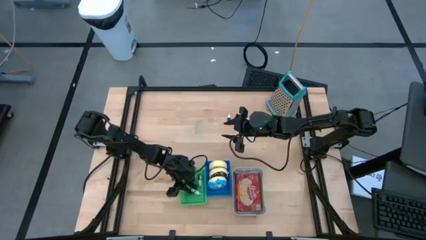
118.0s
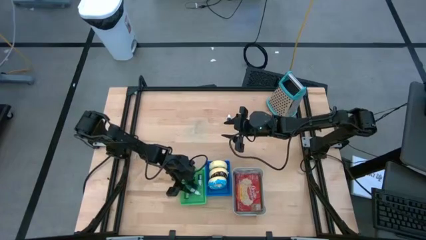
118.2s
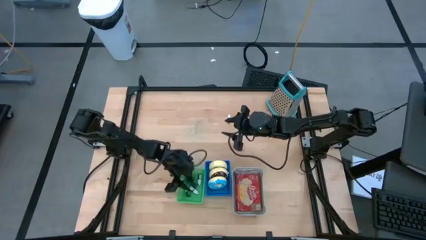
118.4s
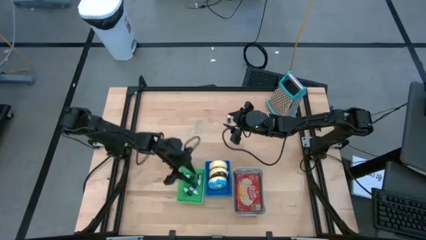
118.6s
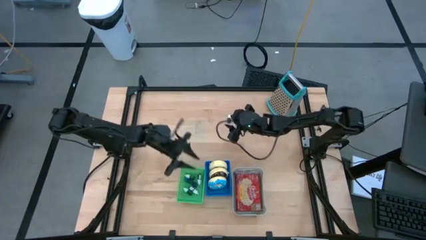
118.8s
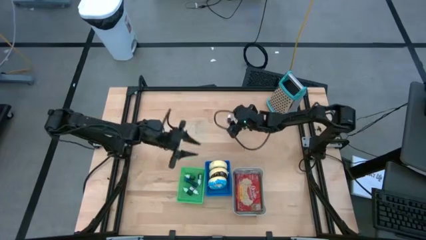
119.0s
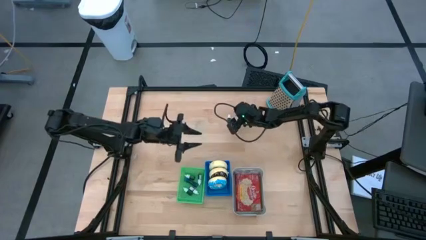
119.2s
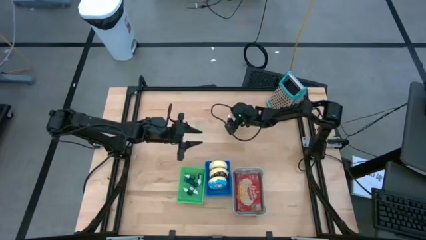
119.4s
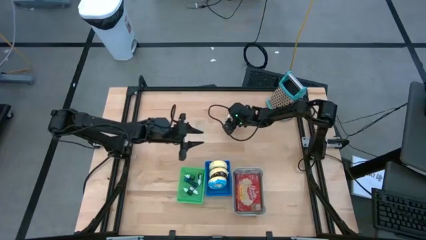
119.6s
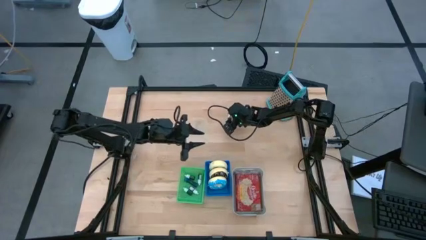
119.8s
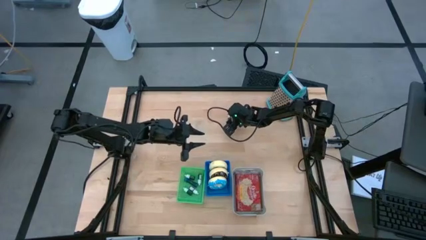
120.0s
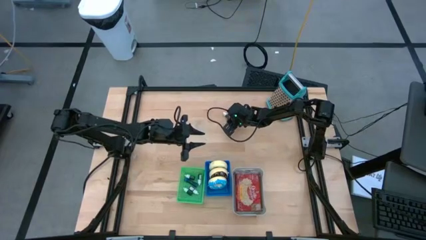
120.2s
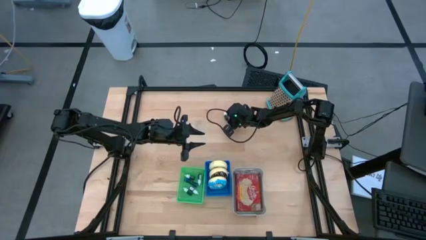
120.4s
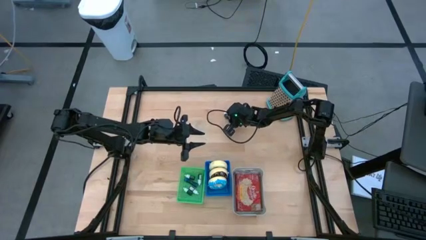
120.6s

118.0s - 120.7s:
Put the dark blue food coloring bottle into the green bin

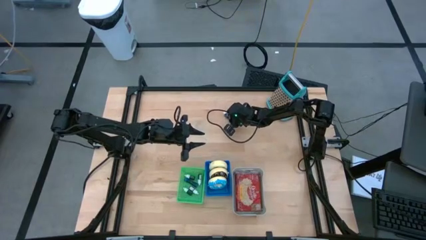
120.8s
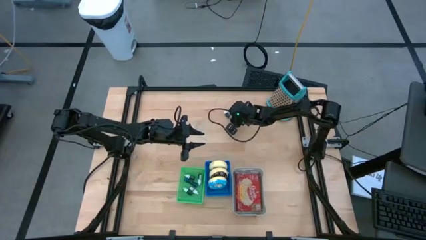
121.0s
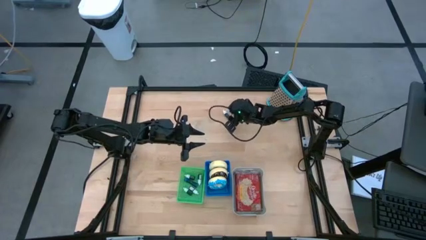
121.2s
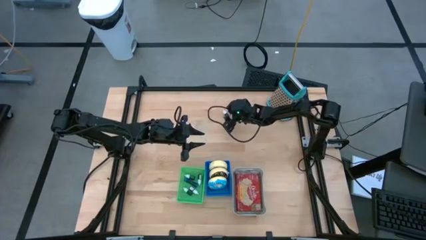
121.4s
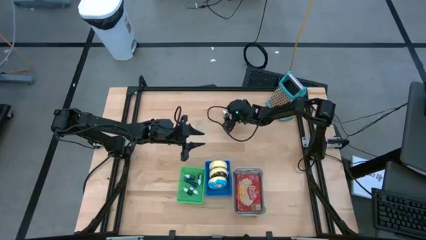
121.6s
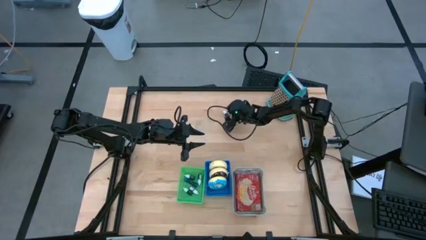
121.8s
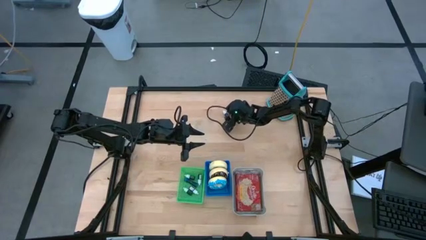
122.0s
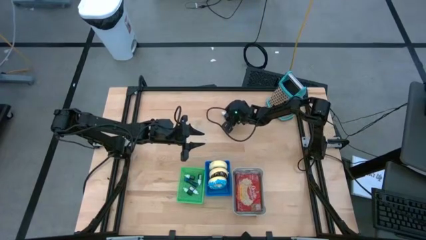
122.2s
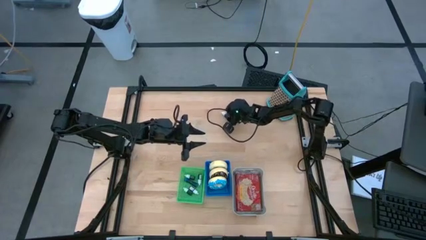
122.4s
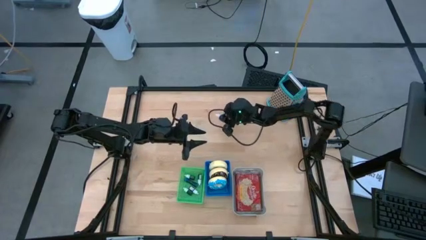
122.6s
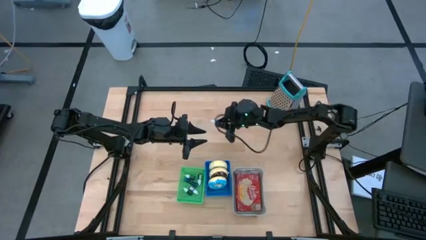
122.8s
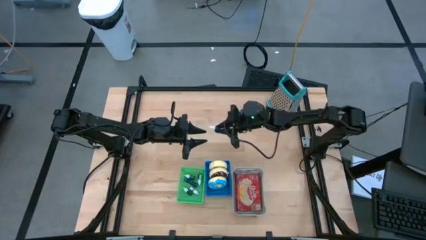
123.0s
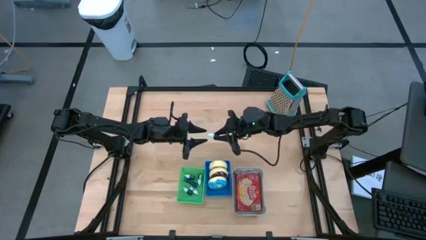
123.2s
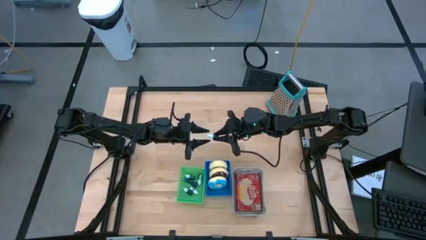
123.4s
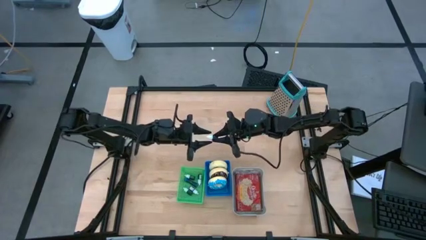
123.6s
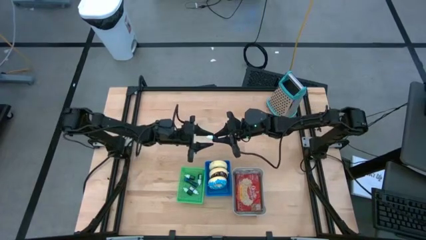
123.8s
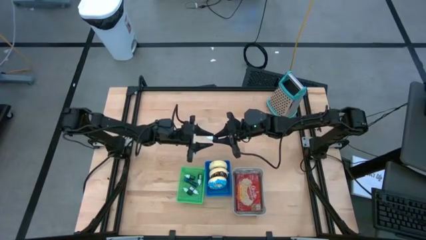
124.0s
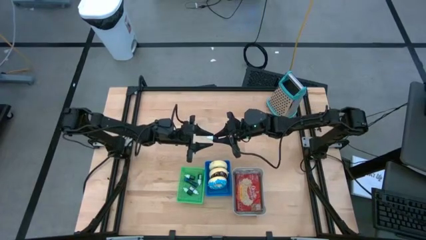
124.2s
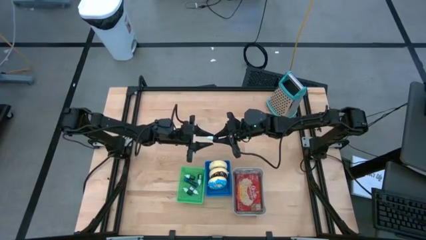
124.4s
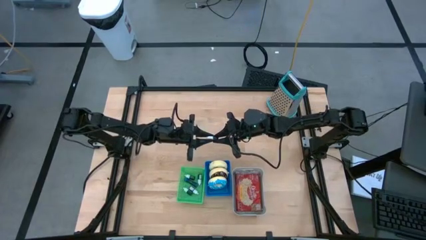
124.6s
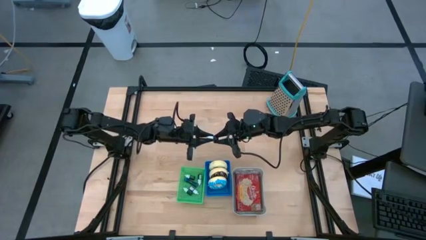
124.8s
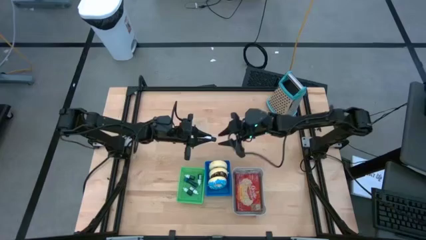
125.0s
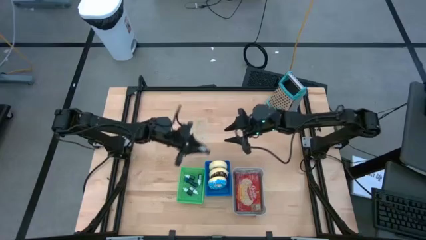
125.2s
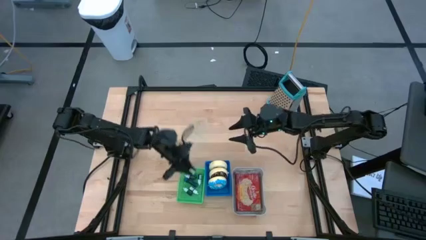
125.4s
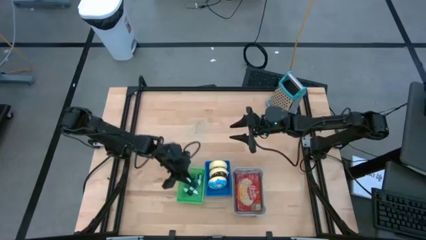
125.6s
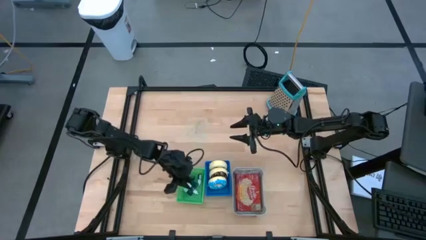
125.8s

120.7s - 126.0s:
Put the dark blue food coloring bottle into the green bin

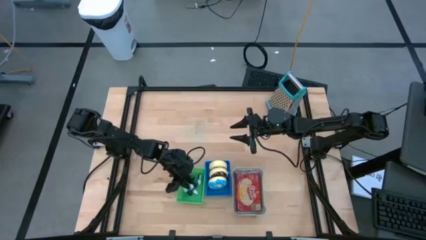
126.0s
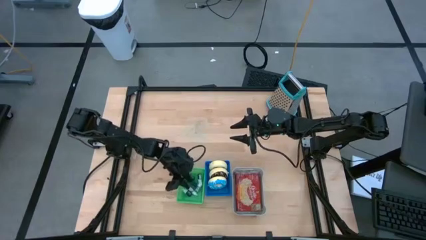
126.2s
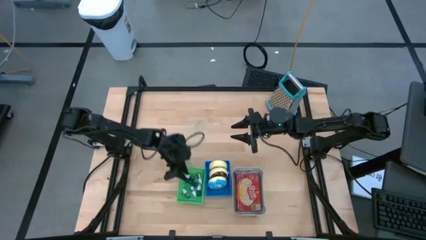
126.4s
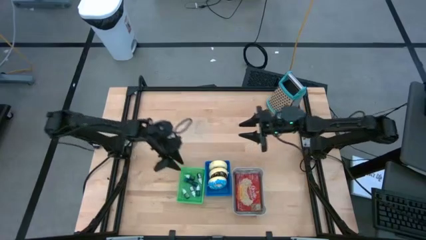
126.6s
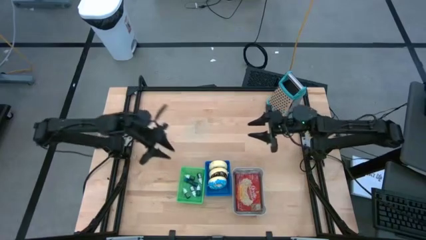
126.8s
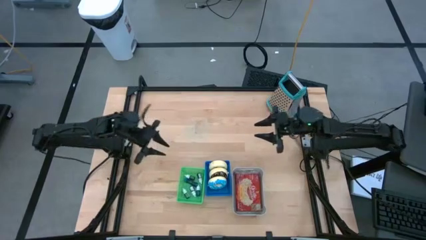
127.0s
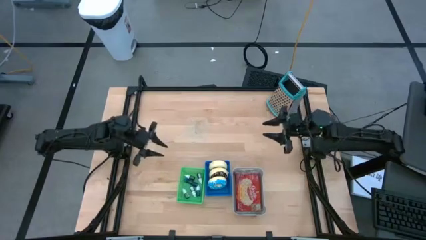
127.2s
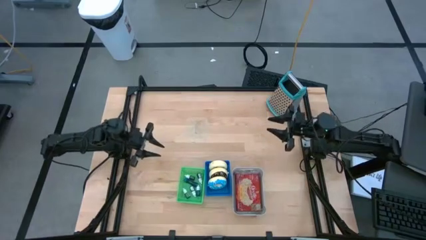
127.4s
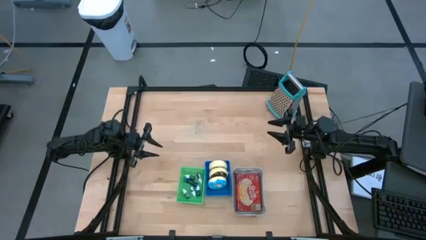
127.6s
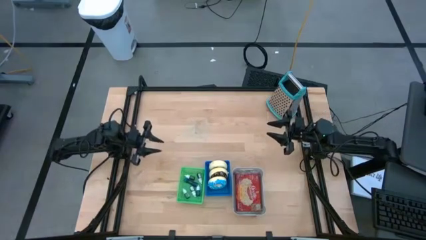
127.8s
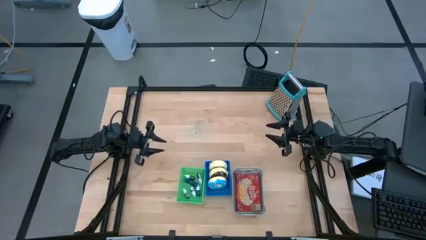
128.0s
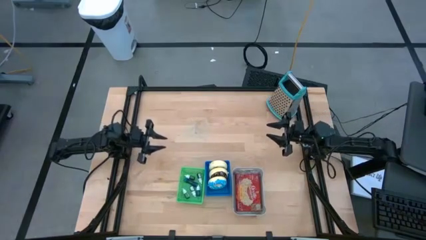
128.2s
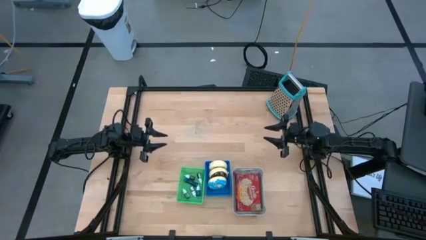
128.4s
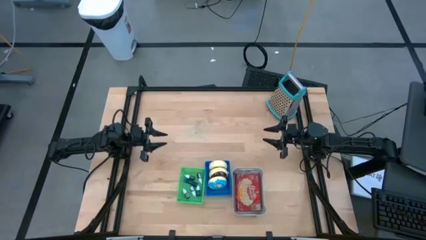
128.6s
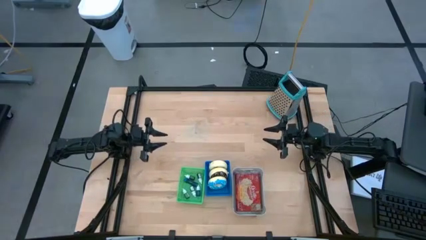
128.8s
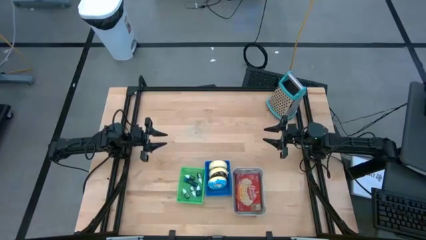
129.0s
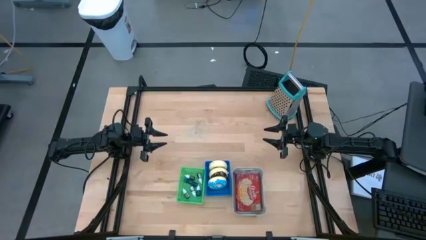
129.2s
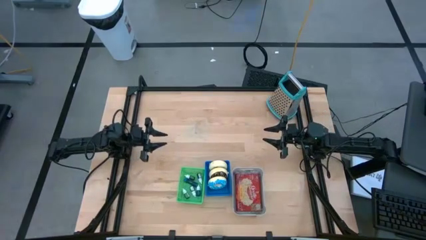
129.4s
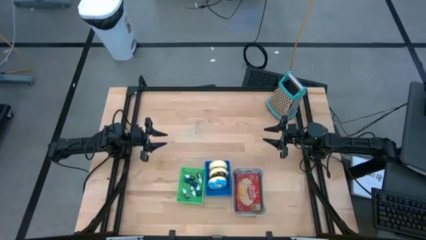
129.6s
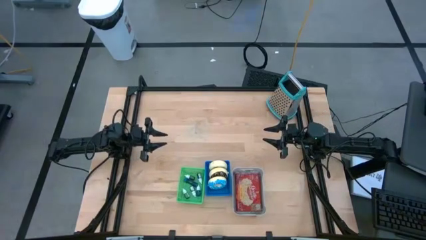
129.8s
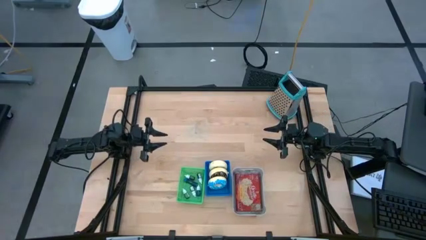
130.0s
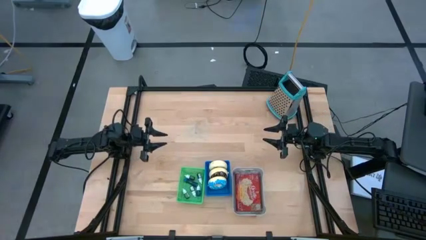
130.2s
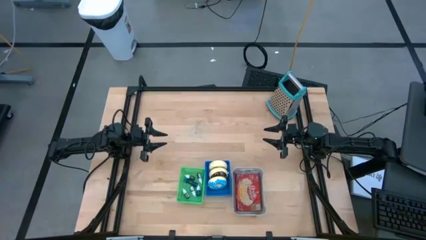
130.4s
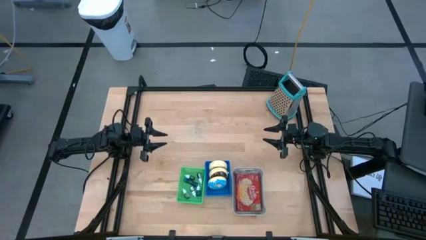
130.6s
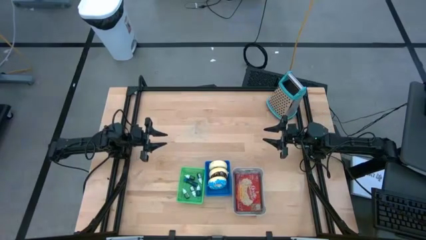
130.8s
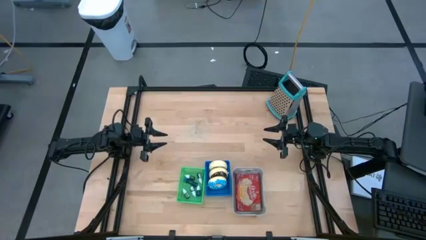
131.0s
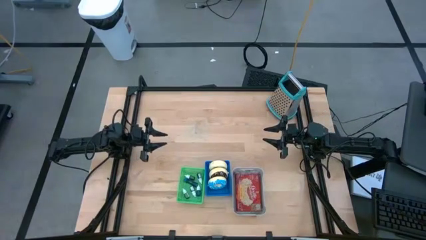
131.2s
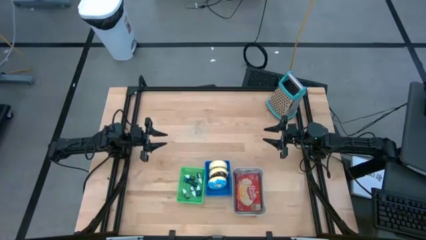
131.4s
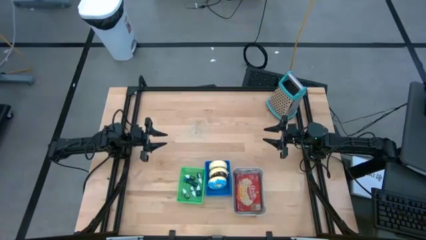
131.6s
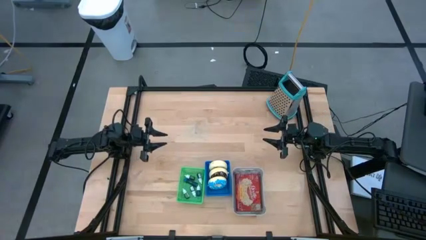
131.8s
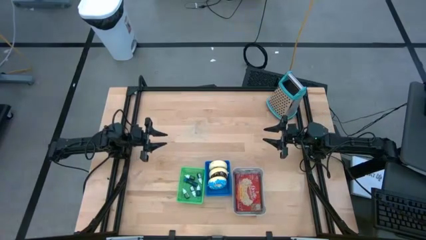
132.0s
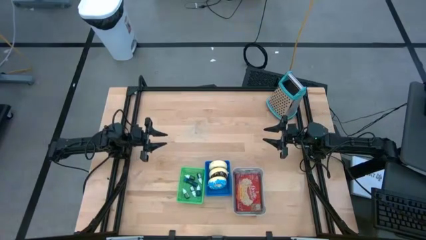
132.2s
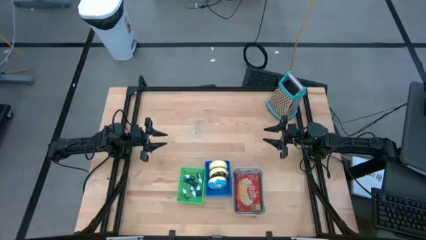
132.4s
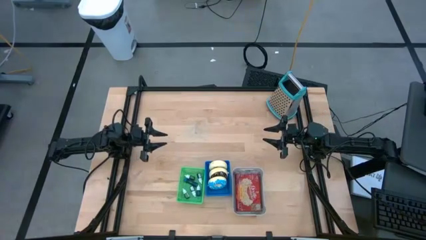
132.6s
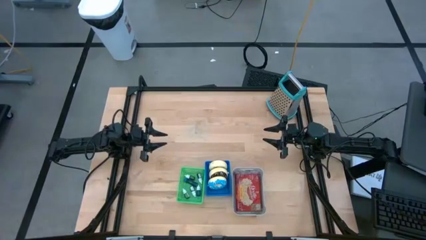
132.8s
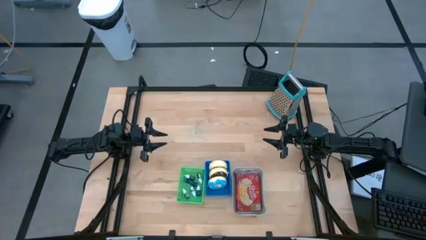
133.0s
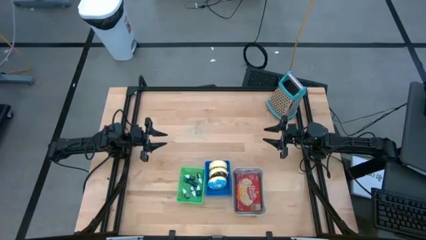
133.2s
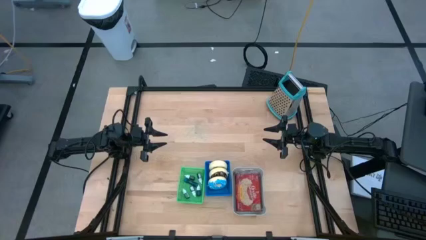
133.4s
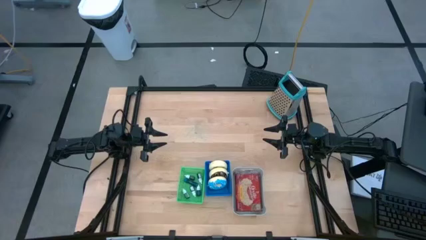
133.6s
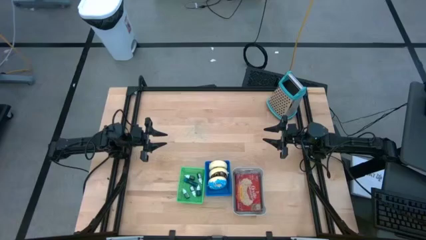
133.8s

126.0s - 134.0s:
Return to Home Position
